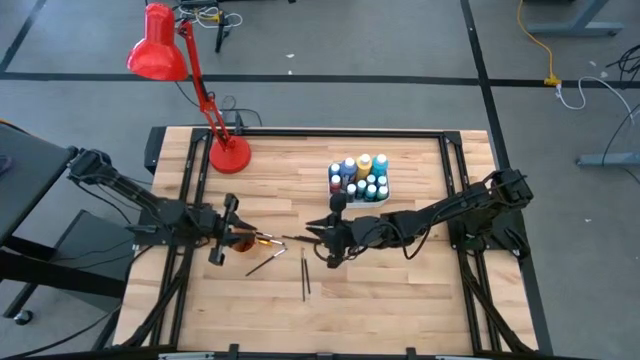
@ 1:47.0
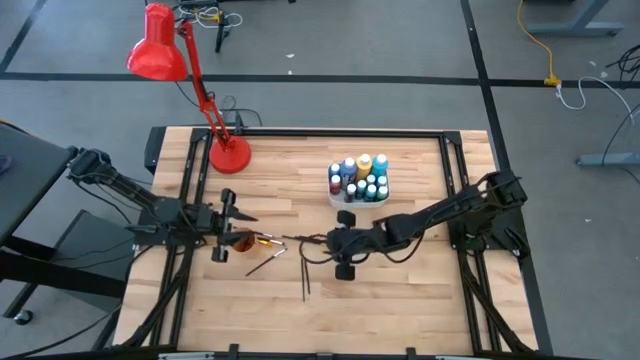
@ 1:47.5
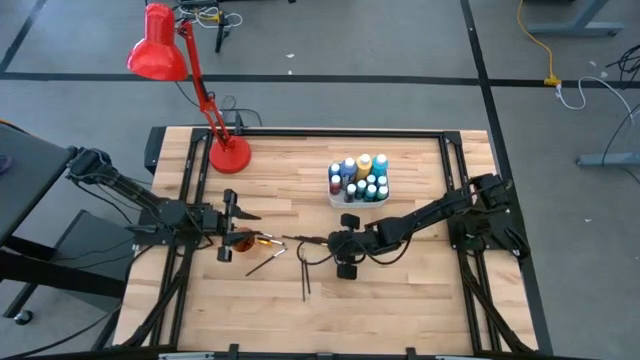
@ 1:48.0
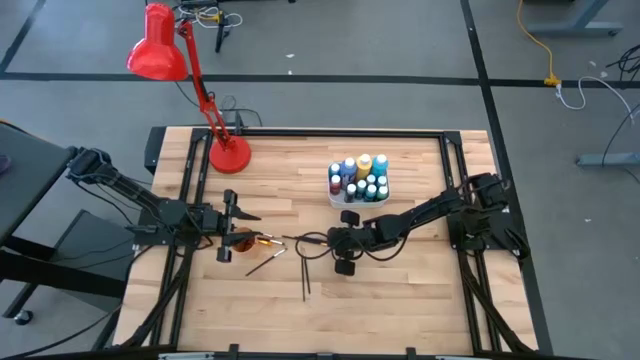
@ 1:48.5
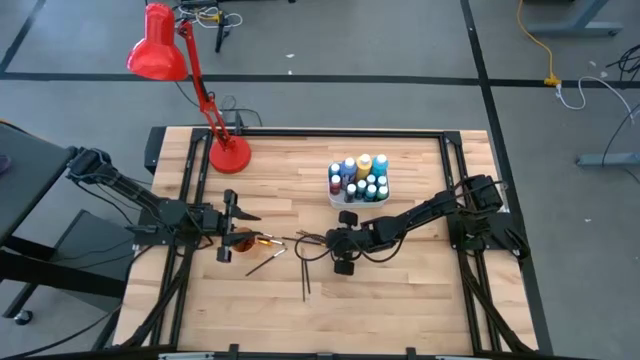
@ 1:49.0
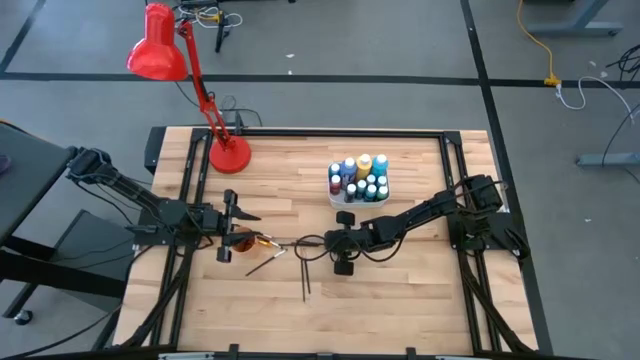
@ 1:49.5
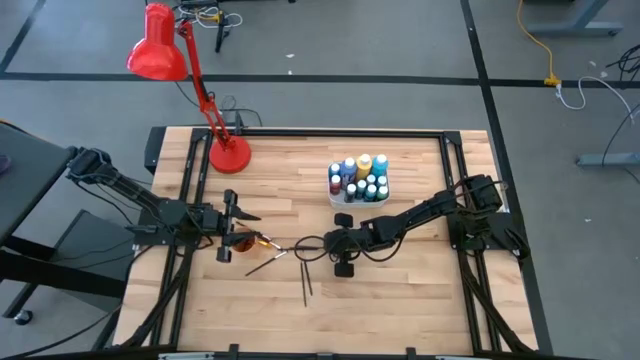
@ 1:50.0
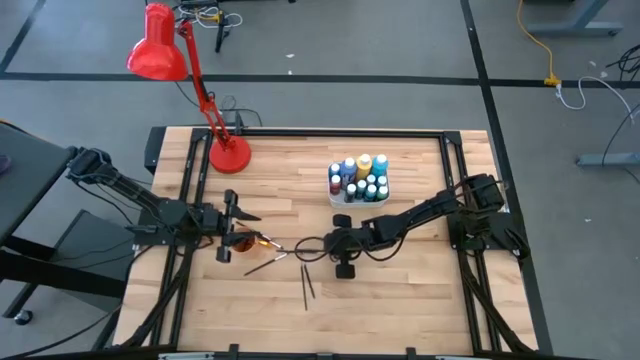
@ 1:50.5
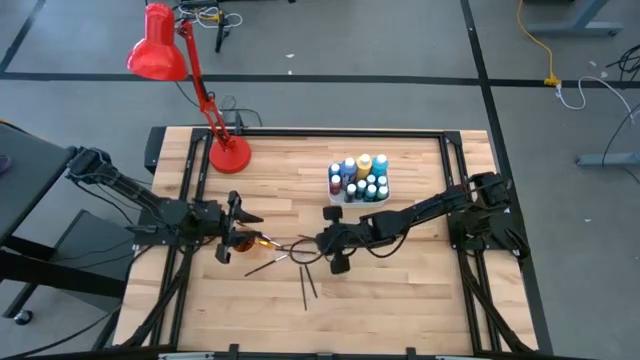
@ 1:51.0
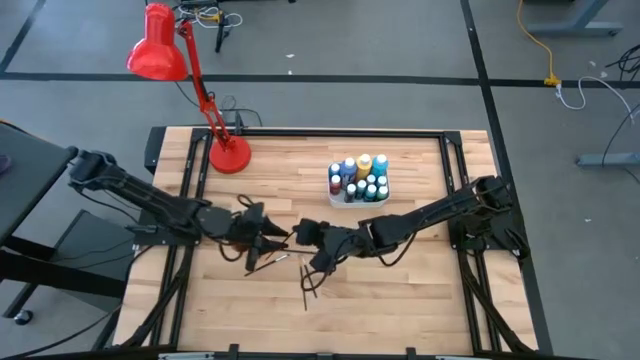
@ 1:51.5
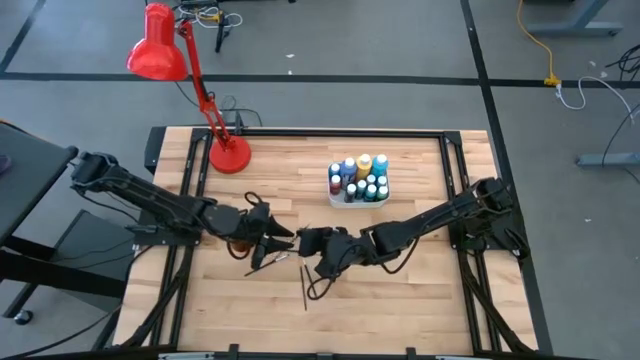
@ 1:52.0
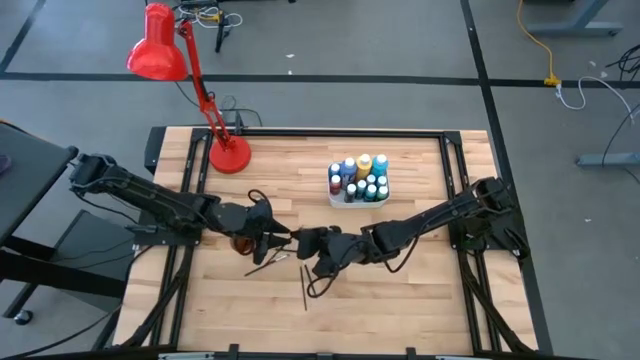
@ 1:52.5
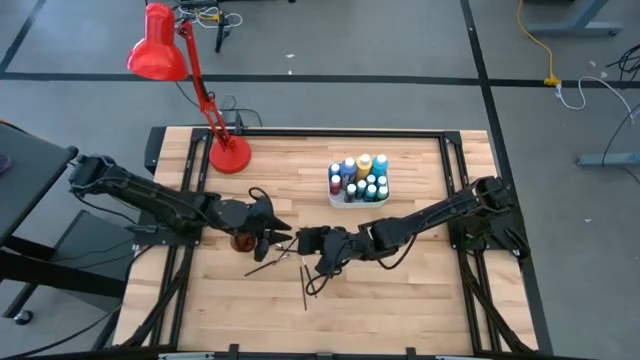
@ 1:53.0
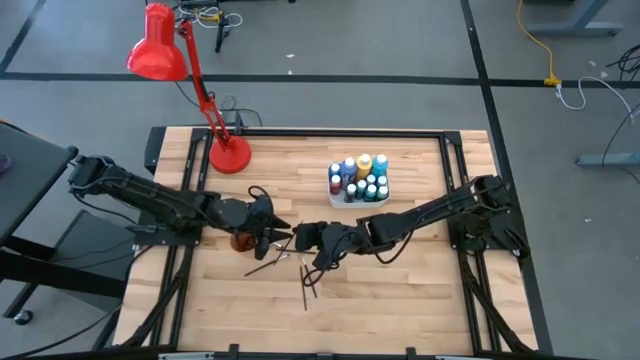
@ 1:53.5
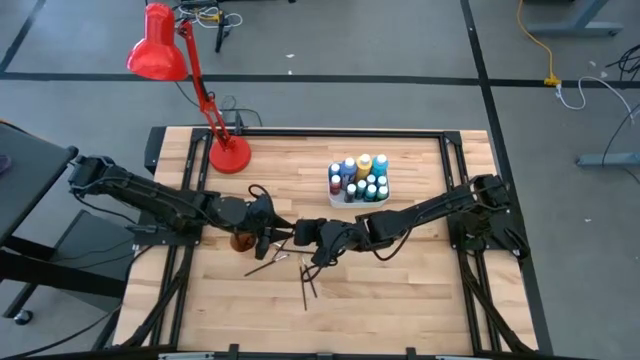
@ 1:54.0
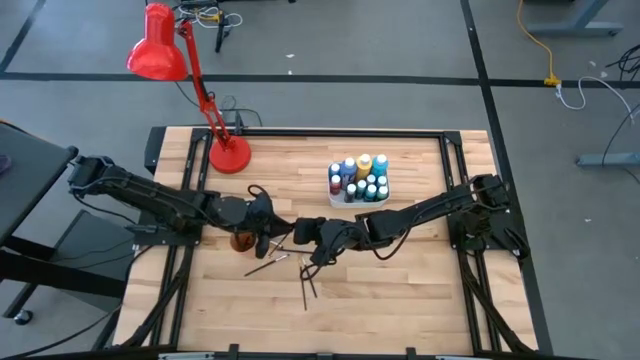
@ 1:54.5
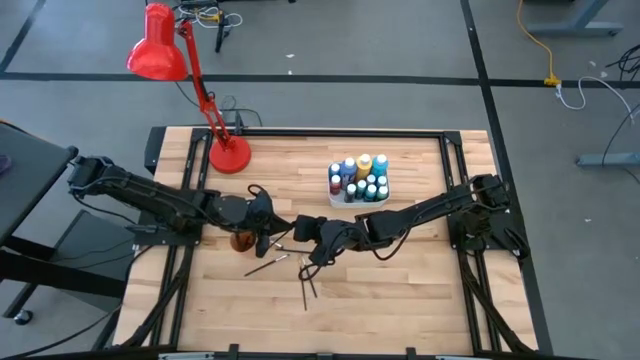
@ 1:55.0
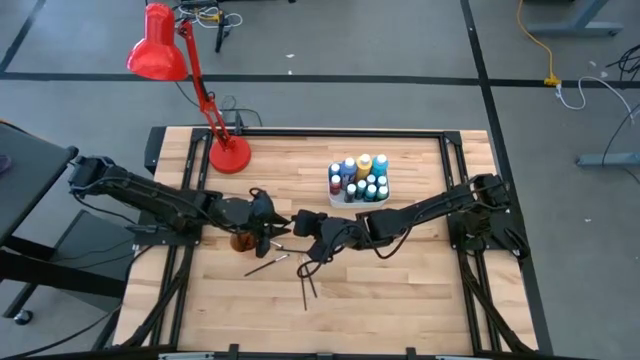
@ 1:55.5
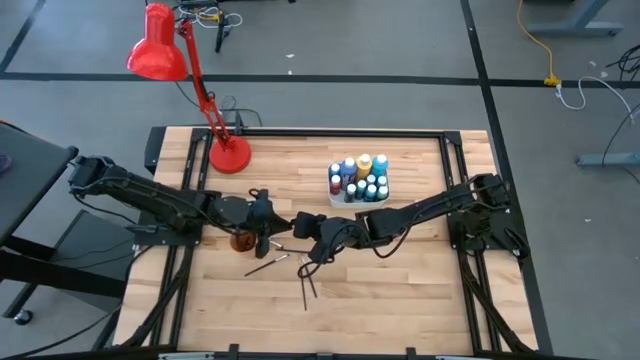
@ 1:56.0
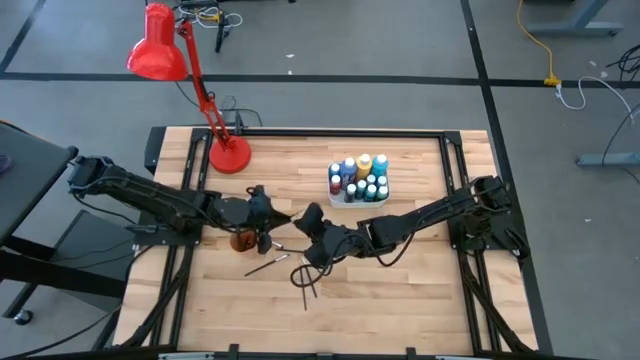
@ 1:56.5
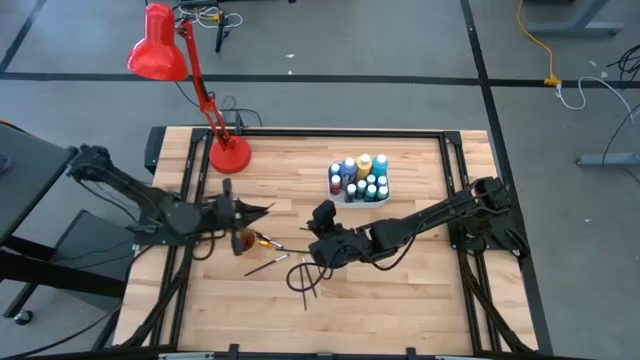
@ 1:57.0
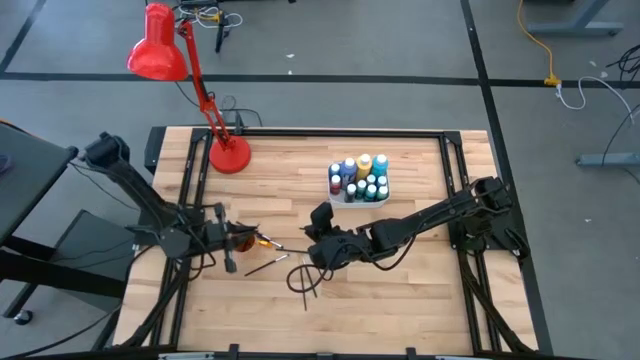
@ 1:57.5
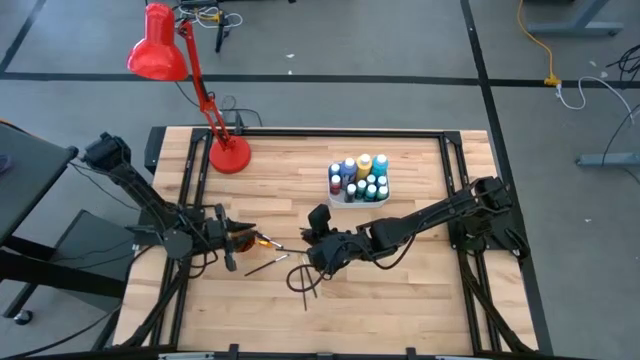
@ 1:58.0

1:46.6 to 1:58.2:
Task: Pick & Place Paint Supplies
Put the gold paint brush into the orange cup

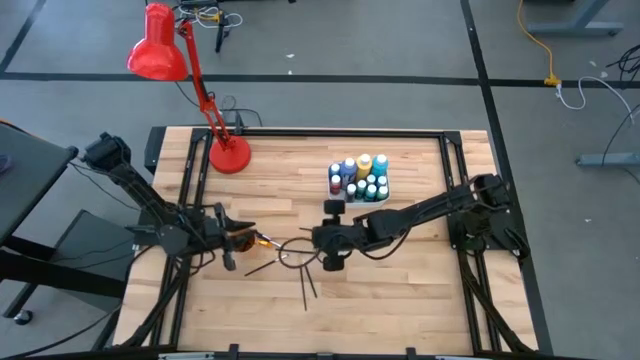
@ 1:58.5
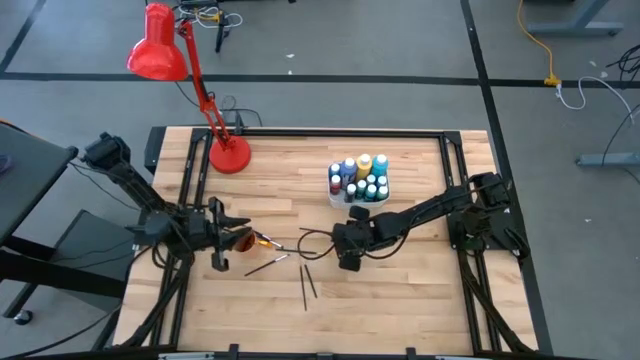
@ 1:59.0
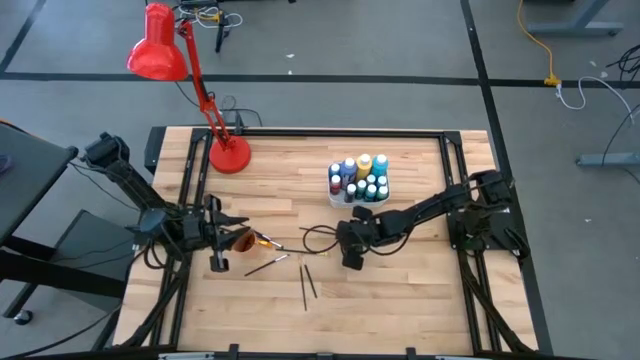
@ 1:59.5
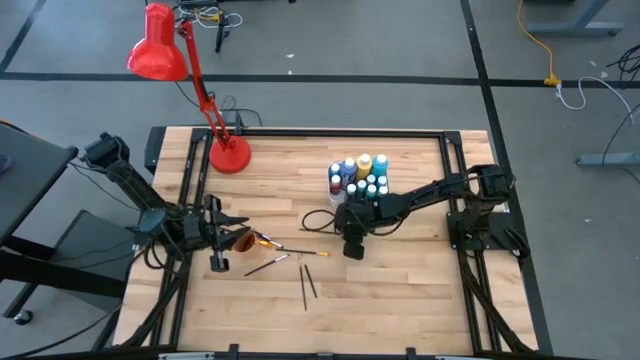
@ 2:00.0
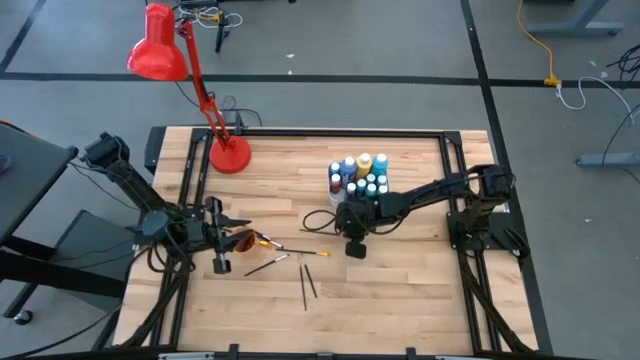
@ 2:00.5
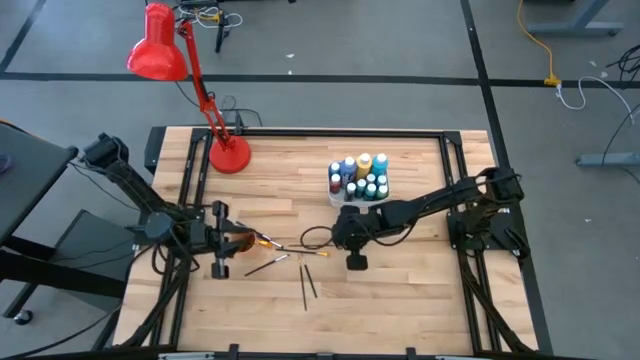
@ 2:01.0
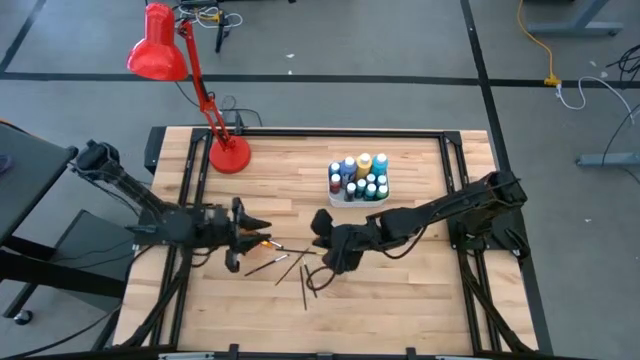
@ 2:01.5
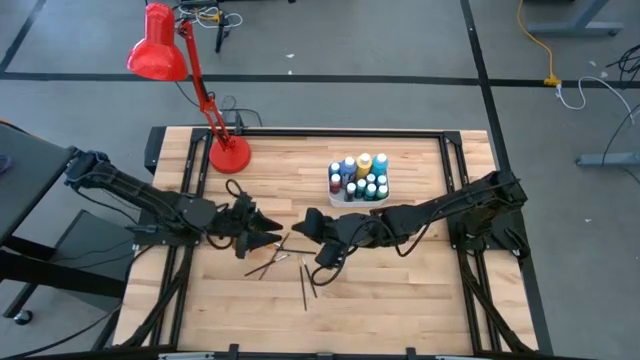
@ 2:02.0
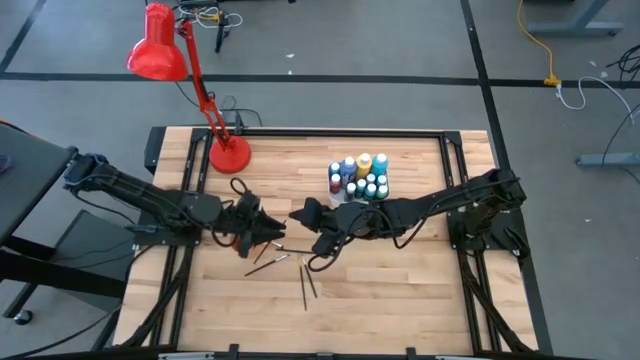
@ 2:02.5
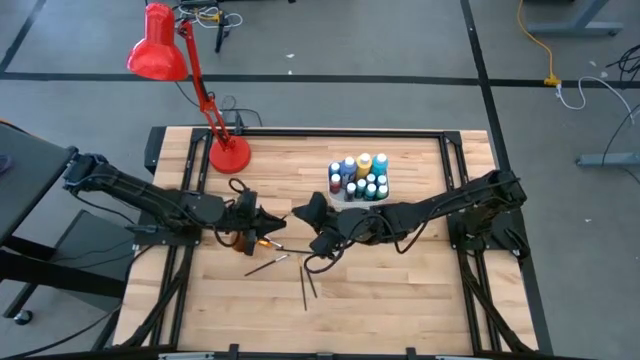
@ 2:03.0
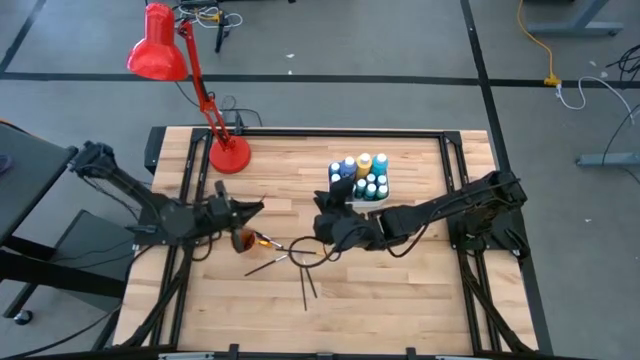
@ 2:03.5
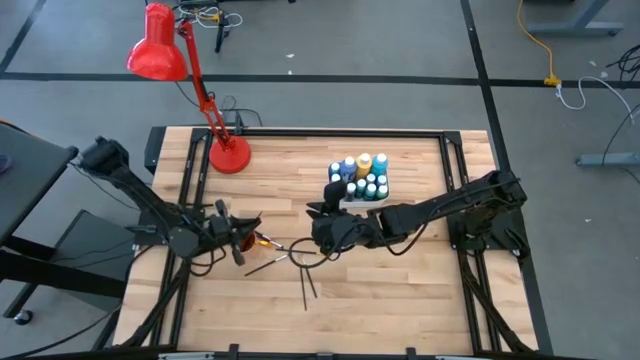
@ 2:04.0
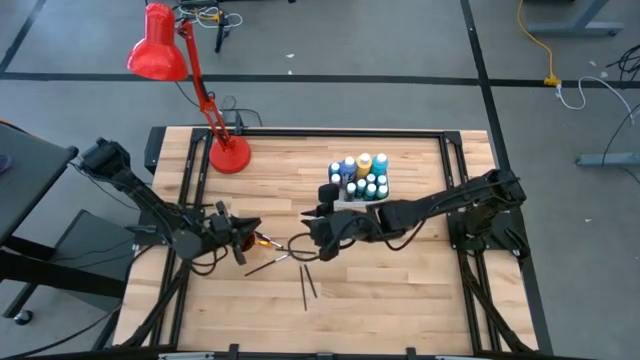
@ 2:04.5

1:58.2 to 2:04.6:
Put the gold paint brush into the orange cup

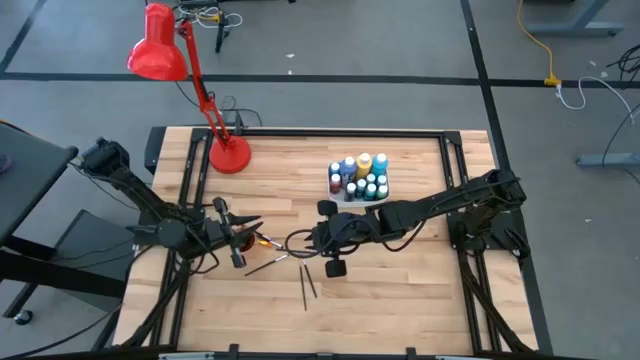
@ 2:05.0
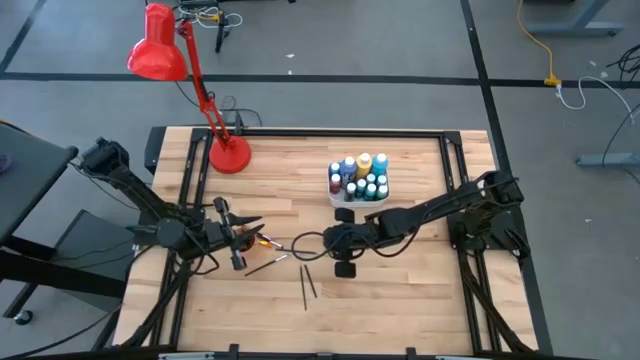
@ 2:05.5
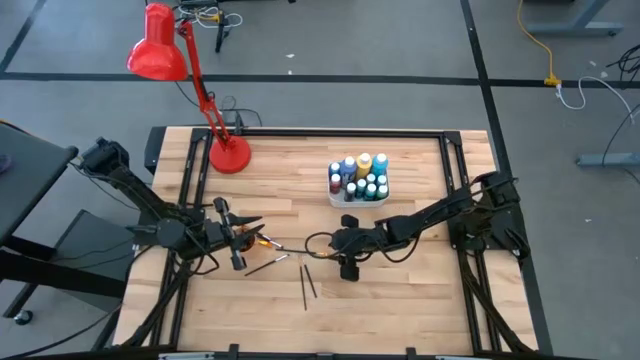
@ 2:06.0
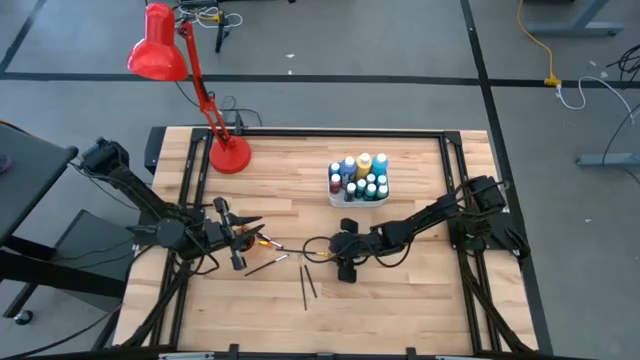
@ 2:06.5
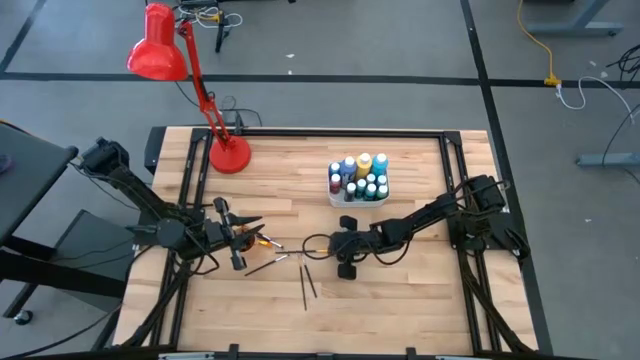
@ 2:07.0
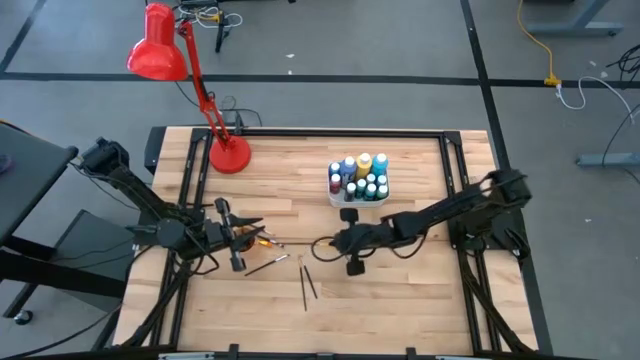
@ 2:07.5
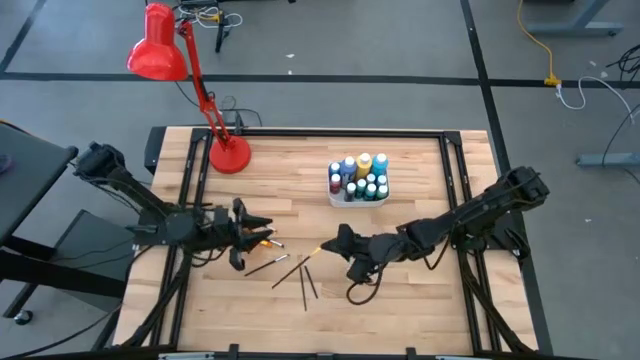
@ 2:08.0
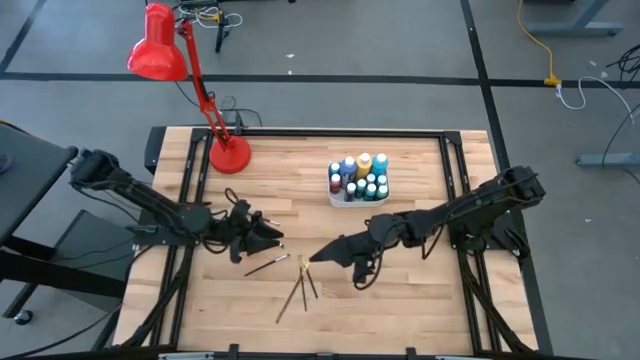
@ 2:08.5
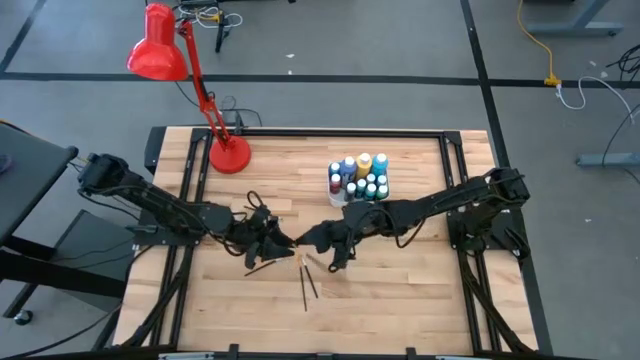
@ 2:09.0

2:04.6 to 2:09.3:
Put the gold paint brush into the orange cup
